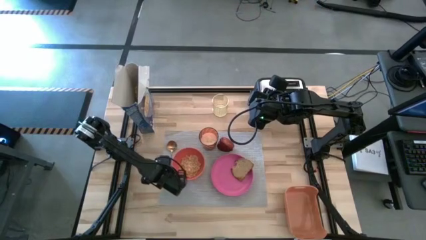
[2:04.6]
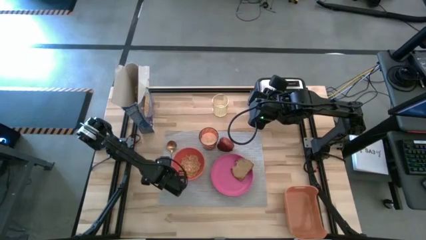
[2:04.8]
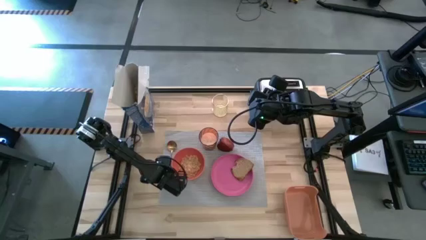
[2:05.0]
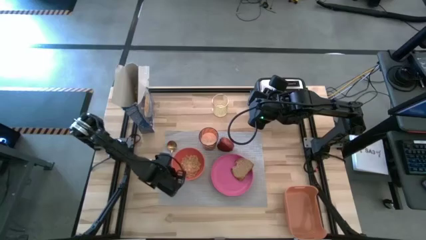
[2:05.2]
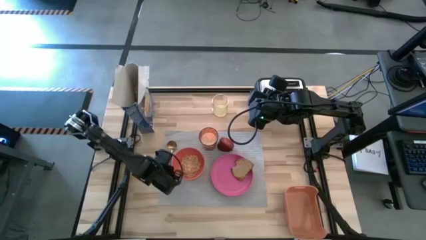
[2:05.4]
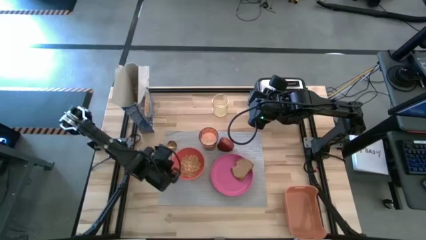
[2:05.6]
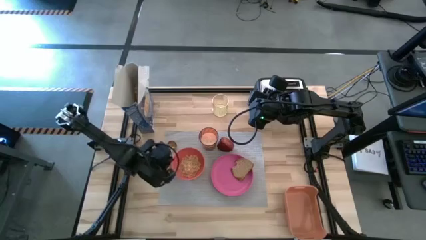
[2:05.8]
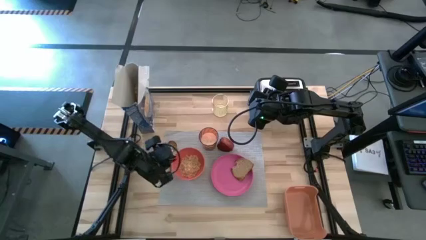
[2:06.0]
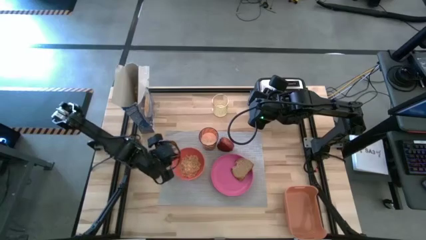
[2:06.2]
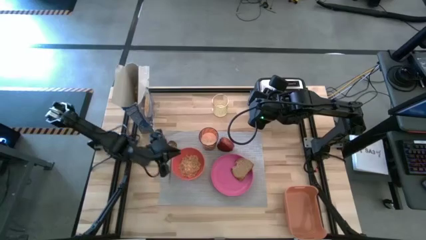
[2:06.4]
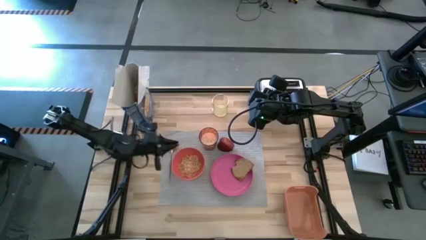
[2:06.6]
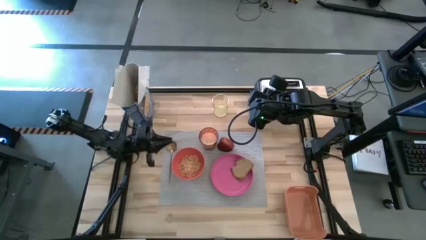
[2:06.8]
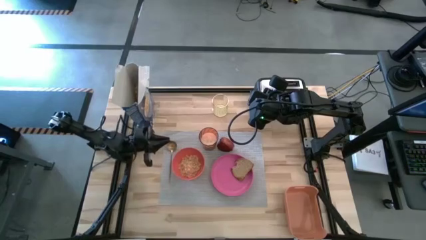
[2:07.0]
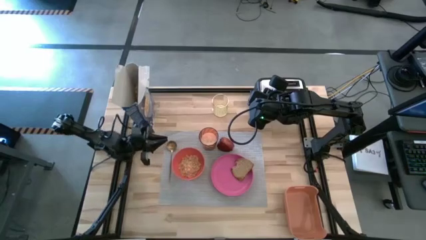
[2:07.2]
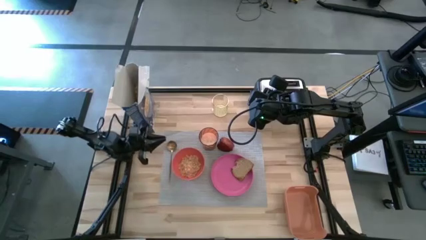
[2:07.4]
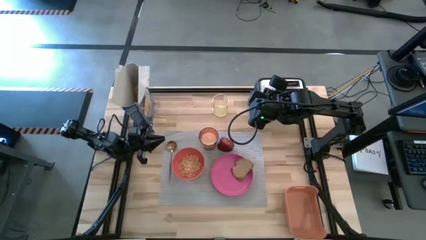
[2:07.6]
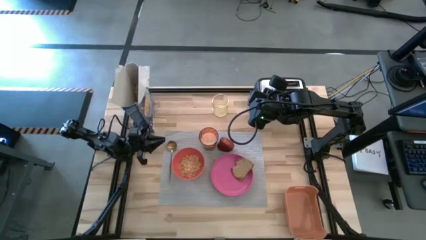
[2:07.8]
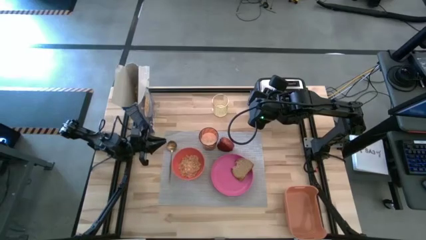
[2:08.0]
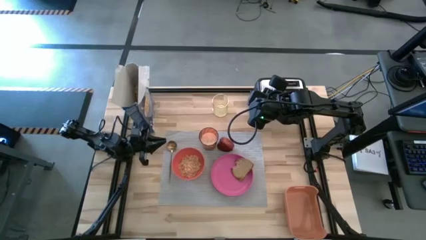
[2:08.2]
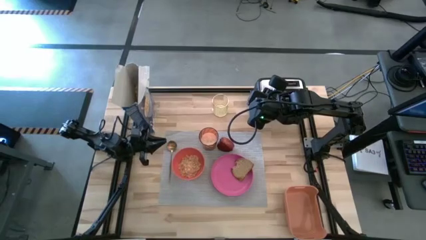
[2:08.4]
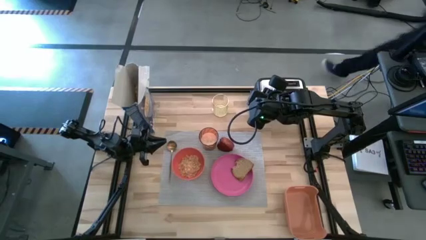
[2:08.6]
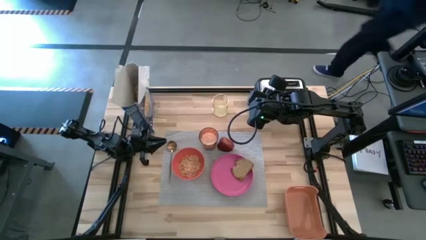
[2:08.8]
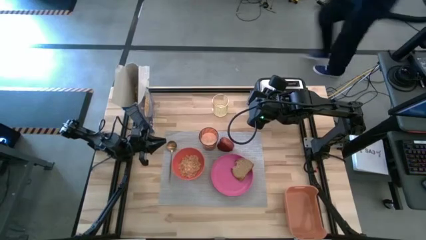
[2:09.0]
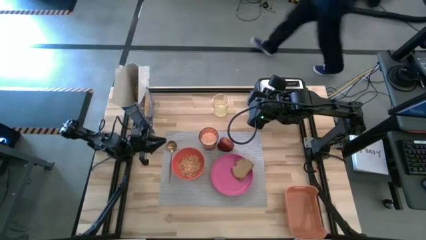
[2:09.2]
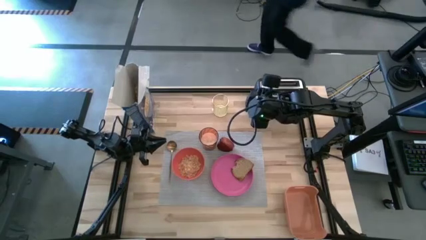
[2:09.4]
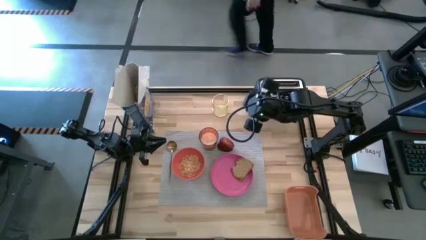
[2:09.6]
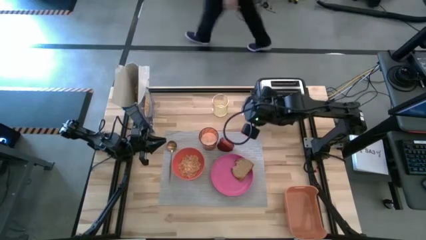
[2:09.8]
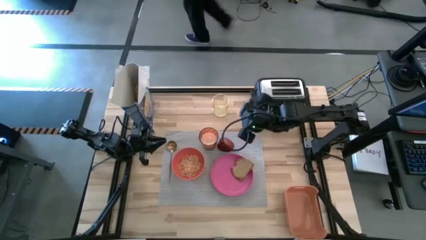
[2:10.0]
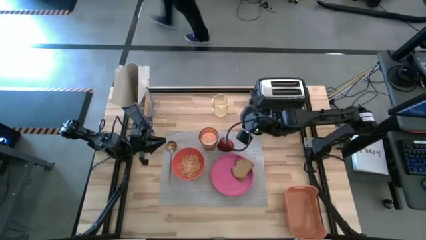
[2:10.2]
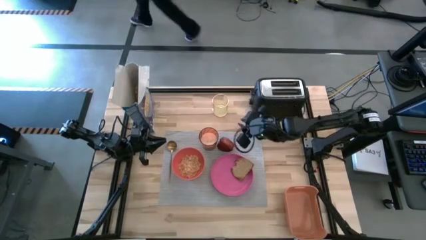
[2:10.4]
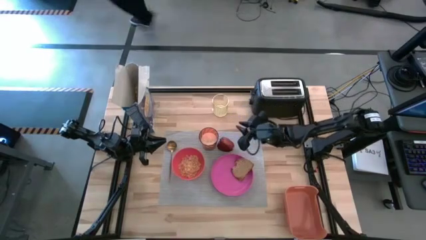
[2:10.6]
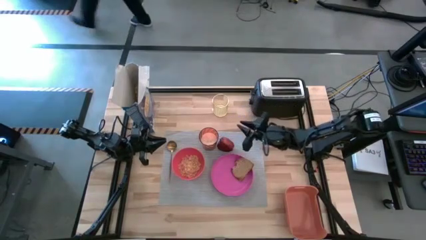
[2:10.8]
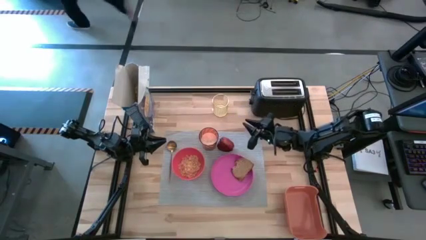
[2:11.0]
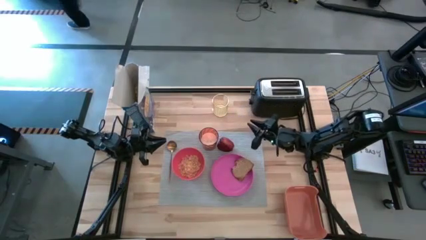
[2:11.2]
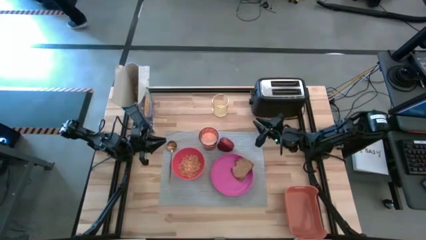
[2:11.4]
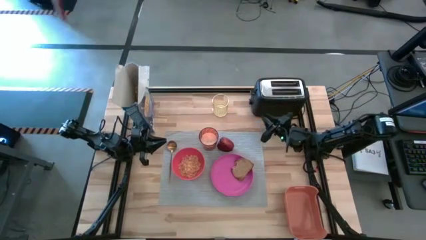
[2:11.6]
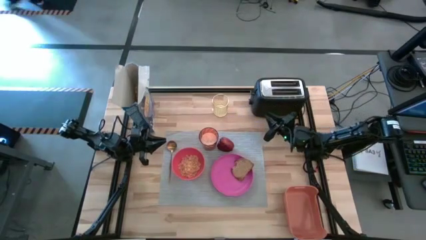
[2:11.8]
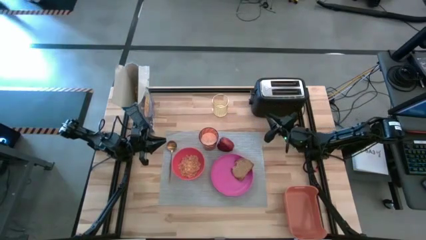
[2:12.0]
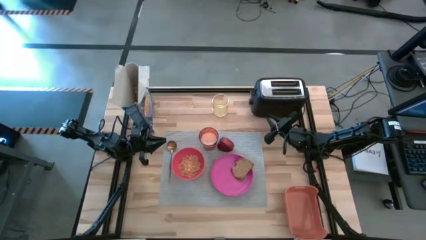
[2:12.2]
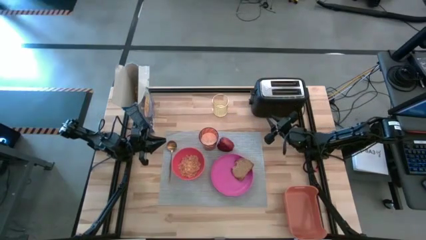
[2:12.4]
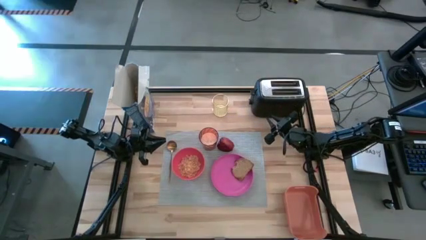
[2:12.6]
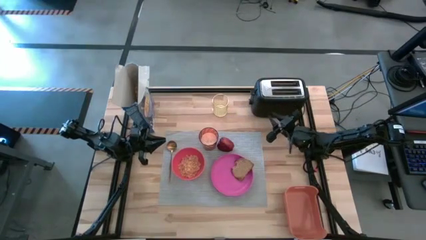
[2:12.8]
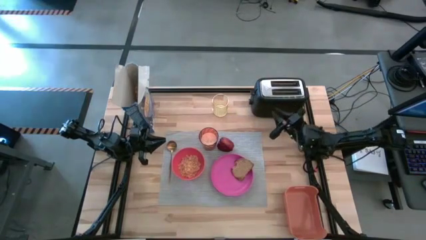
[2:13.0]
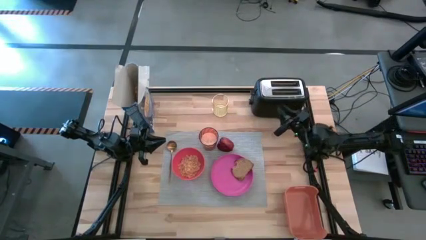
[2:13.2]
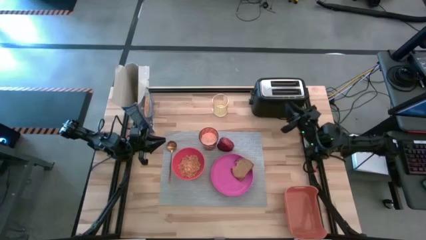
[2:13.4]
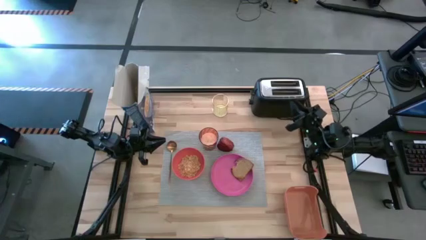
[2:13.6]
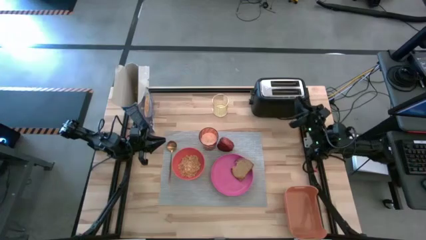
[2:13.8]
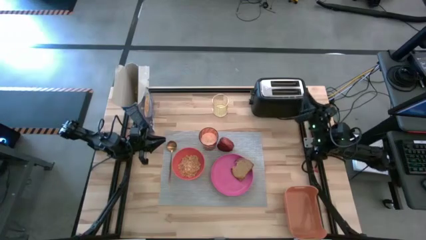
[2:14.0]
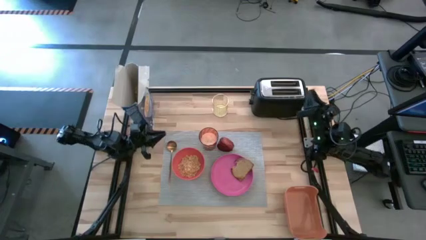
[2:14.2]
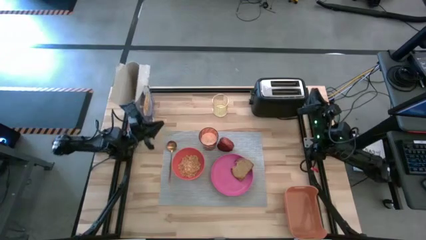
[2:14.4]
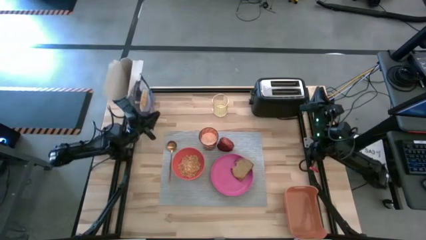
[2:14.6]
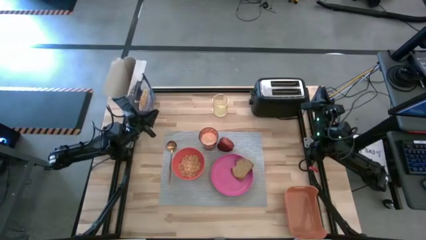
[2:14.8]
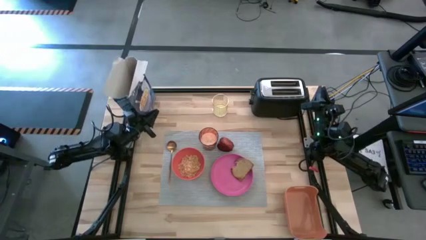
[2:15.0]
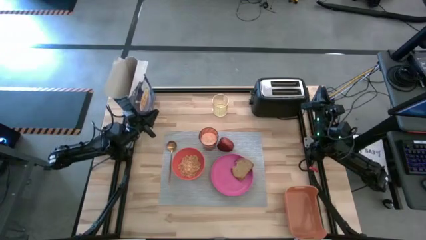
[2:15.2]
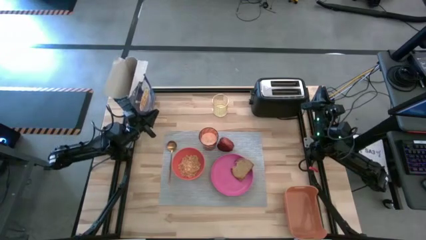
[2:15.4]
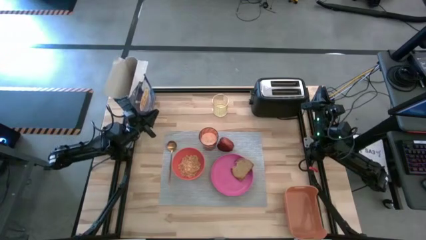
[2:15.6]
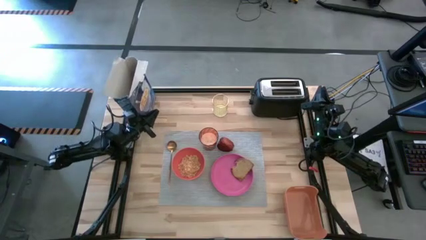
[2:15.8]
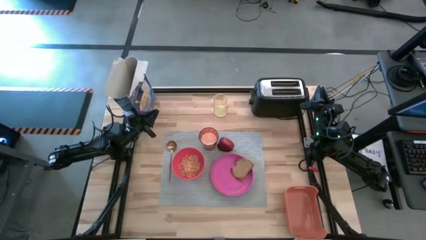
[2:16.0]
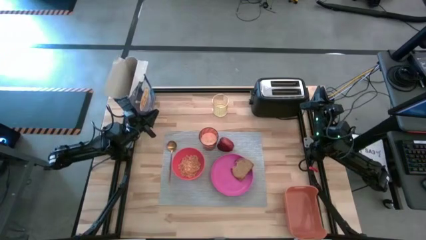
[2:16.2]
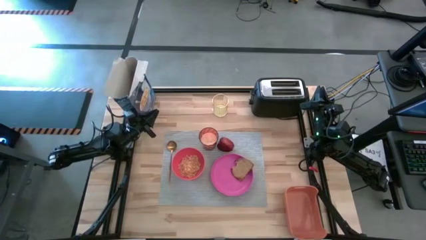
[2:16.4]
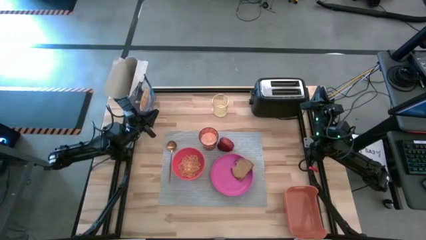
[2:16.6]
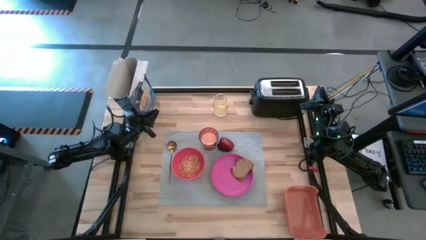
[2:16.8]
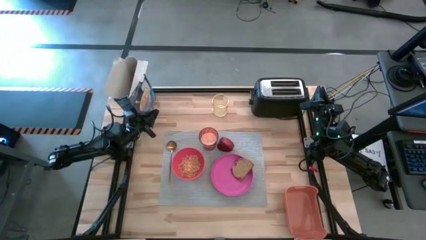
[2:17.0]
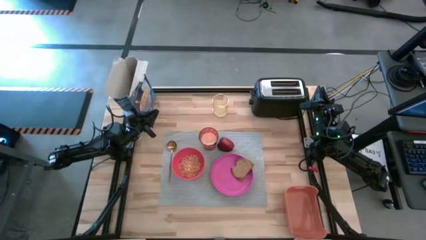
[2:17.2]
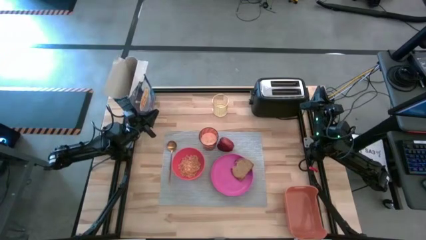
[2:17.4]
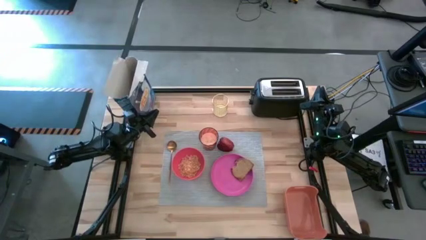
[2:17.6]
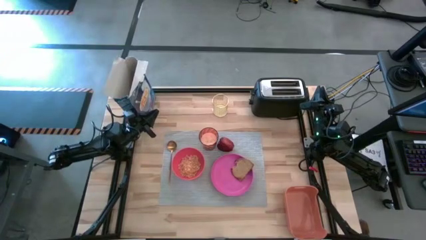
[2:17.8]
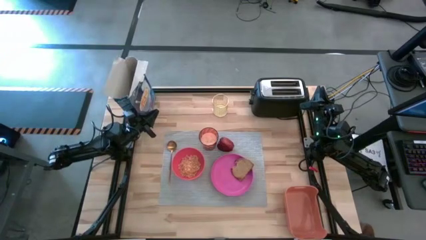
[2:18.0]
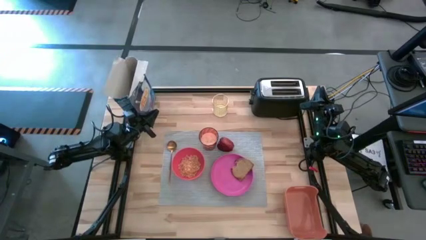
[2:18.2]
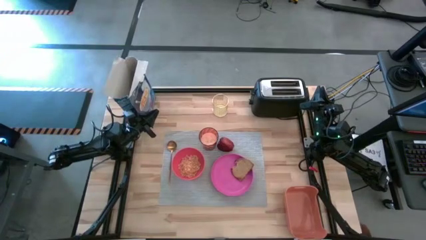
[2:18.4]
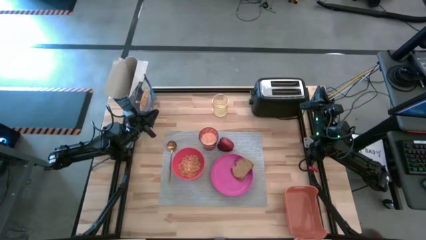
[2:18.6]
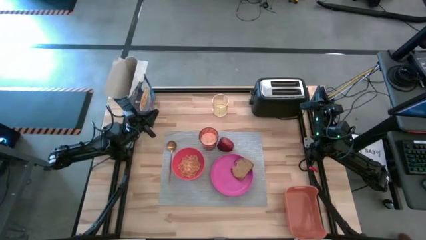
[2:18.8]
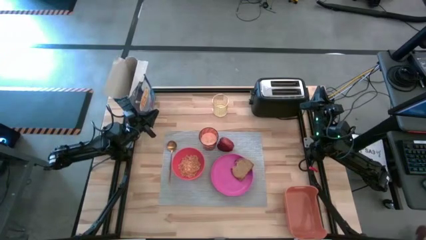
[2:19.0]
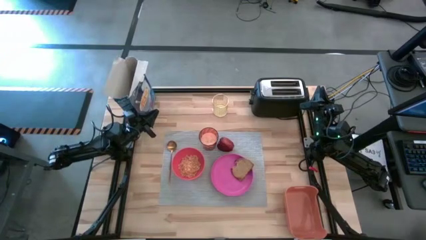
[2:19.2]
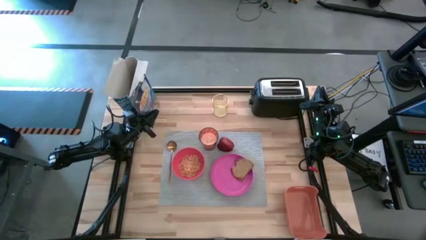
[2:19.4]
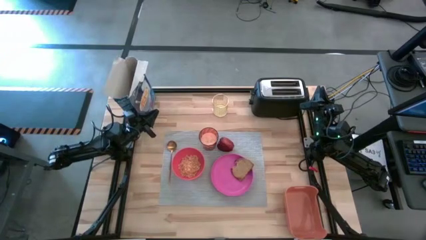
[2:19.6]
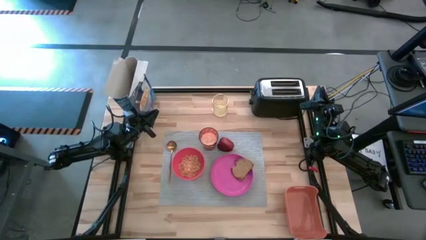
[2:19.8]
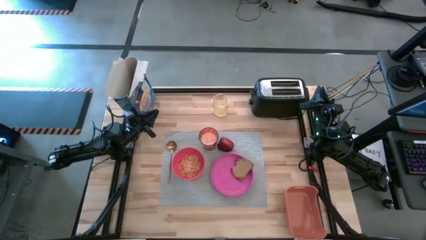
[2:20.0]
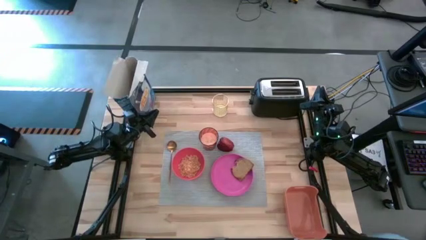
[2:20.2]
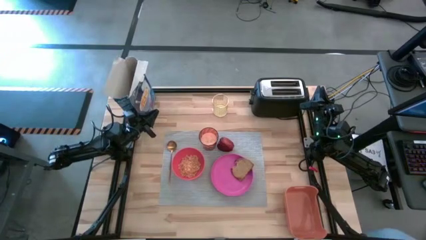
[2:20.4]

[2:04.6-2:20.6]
Task: Arrange a breakfast setting
Return to Home Position
